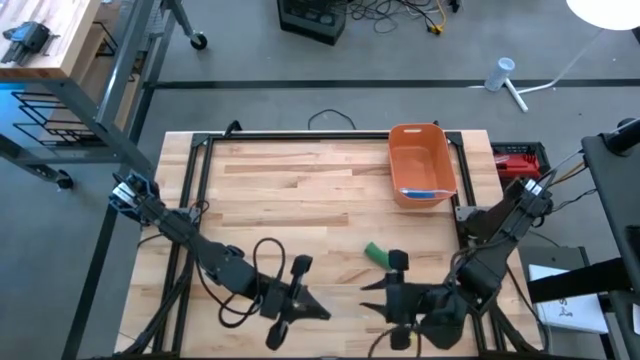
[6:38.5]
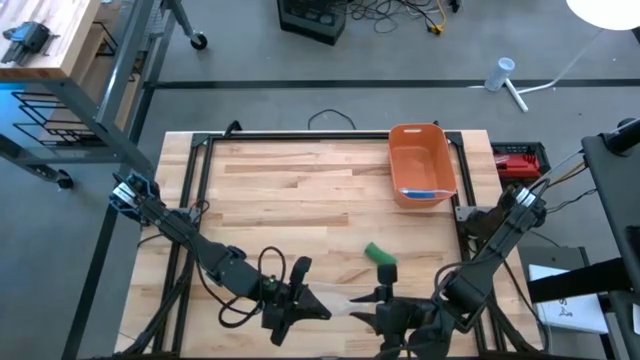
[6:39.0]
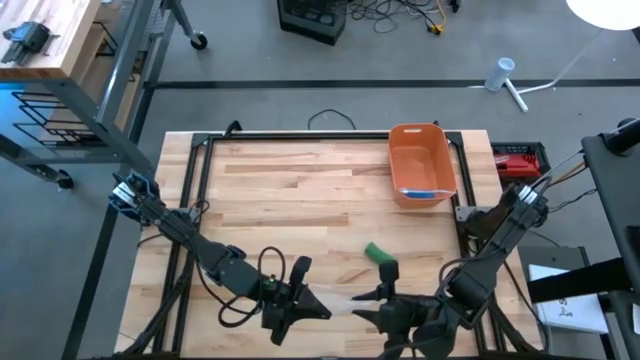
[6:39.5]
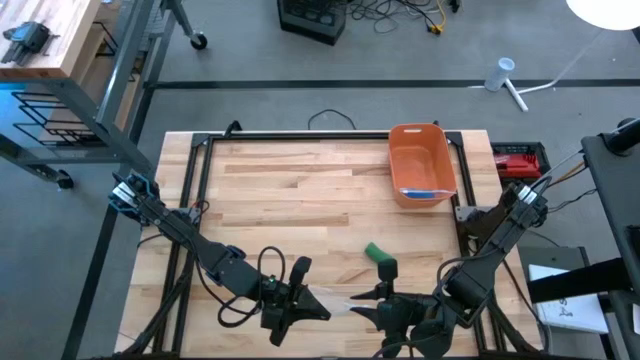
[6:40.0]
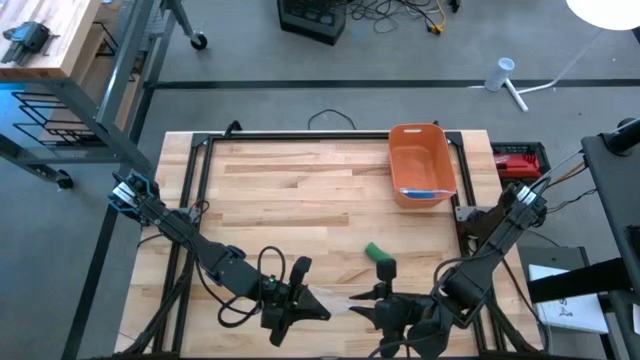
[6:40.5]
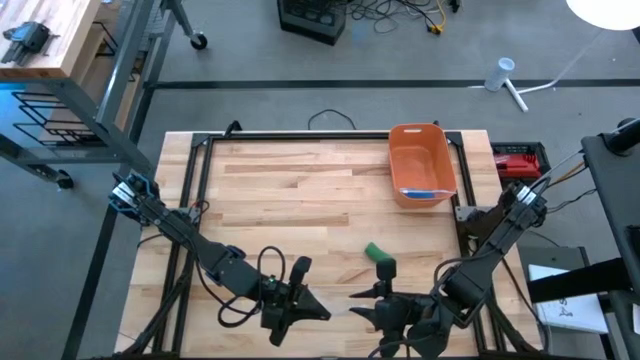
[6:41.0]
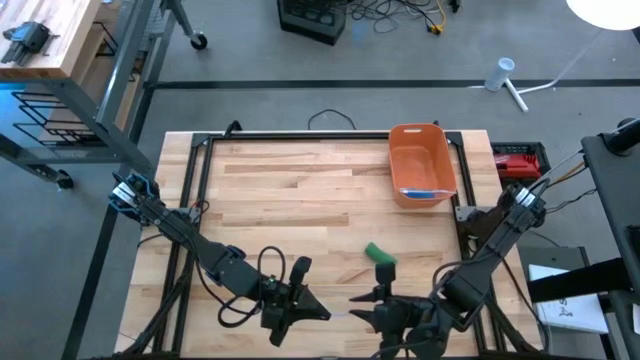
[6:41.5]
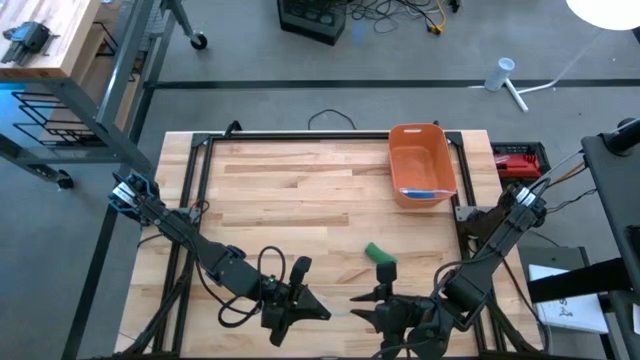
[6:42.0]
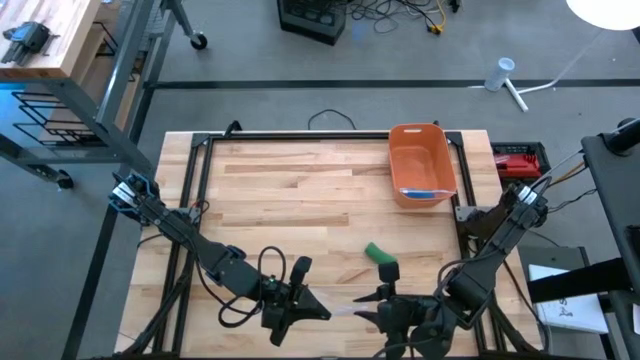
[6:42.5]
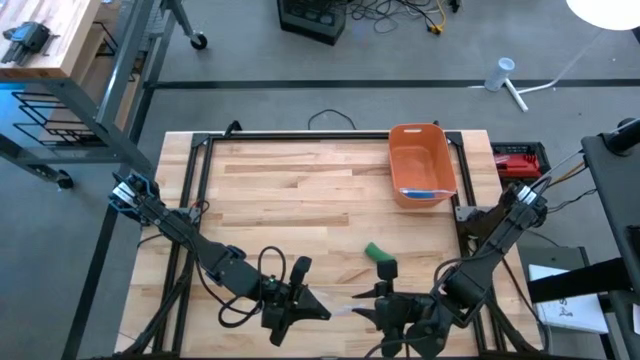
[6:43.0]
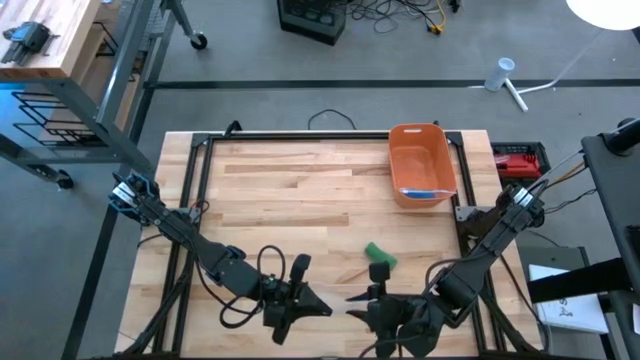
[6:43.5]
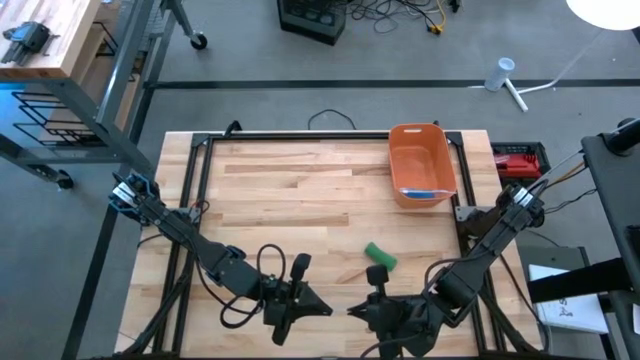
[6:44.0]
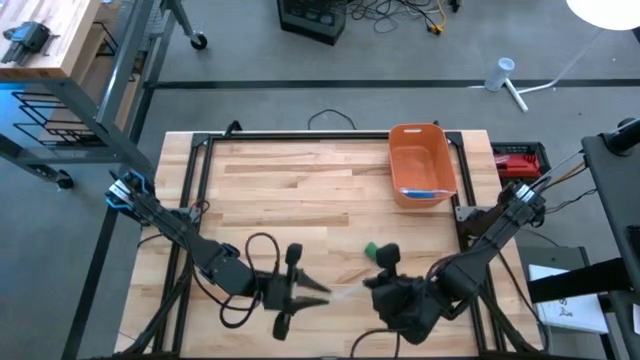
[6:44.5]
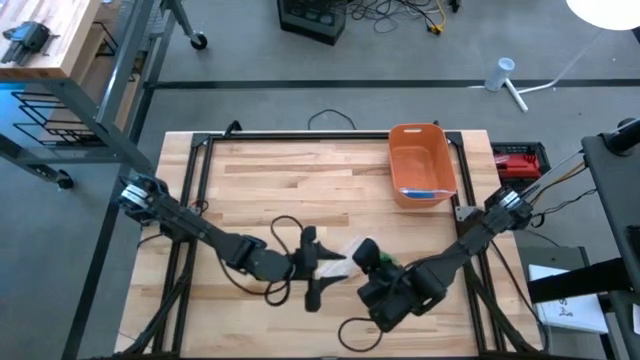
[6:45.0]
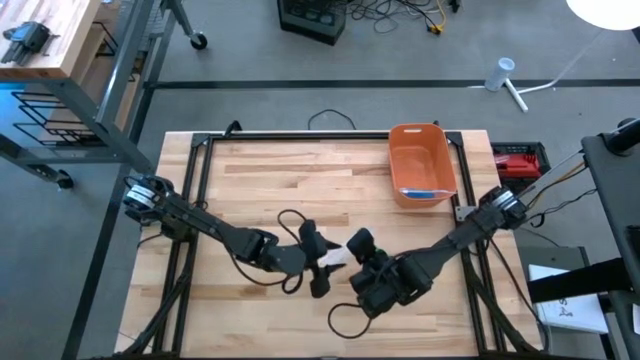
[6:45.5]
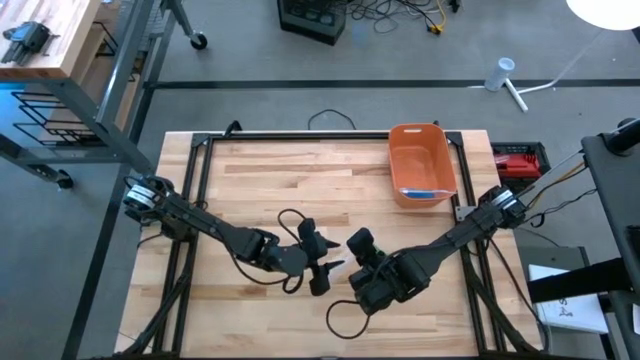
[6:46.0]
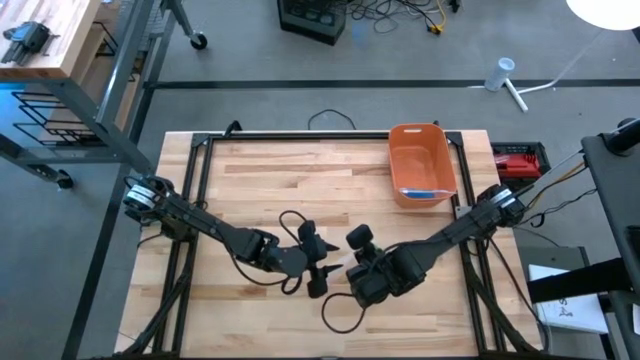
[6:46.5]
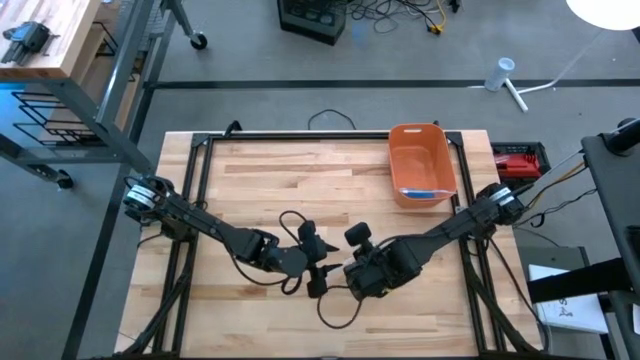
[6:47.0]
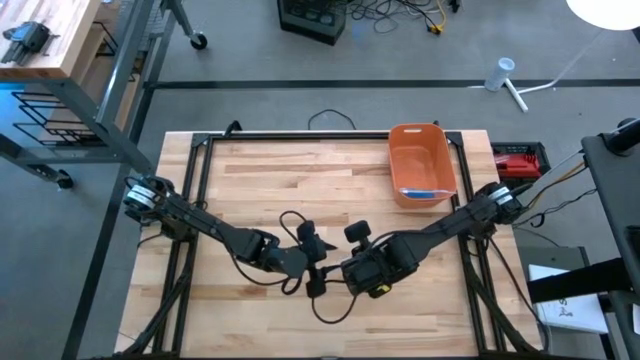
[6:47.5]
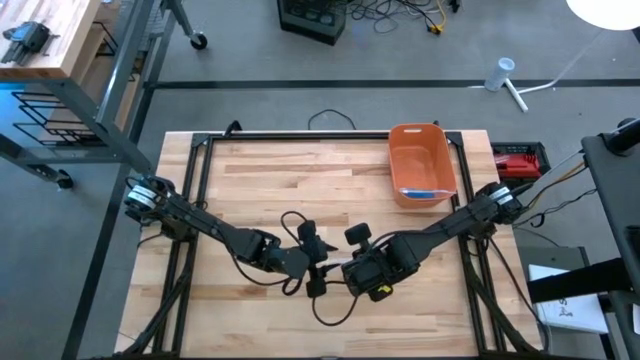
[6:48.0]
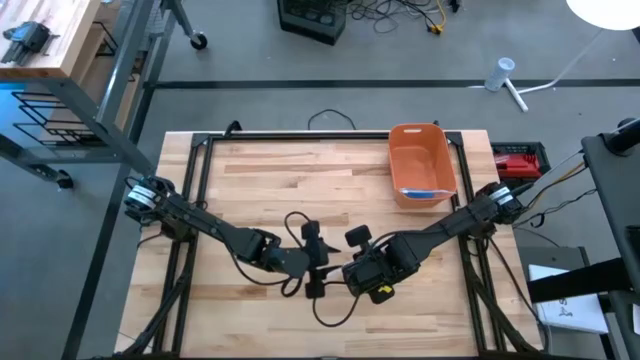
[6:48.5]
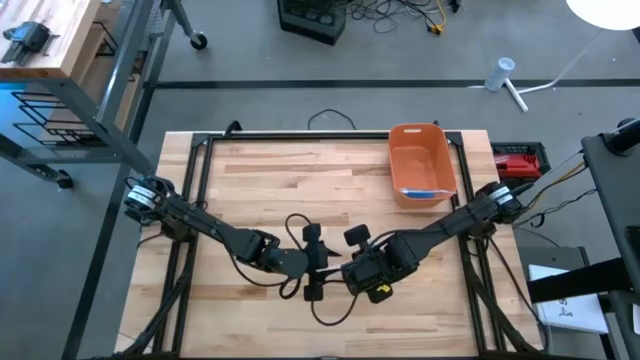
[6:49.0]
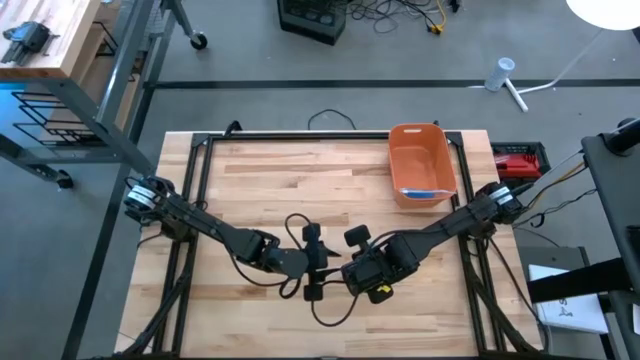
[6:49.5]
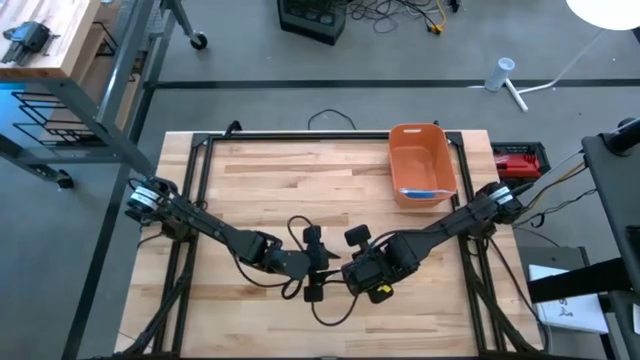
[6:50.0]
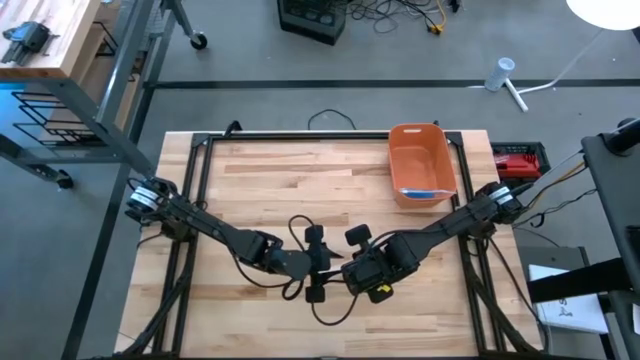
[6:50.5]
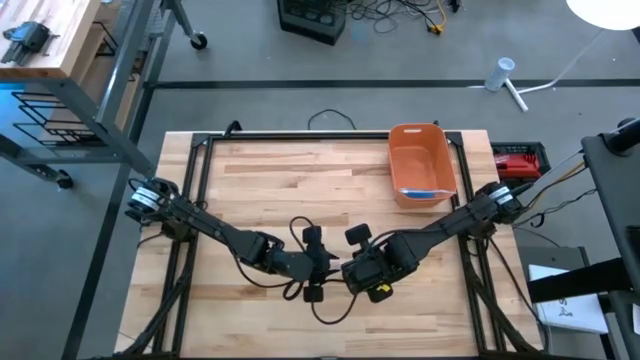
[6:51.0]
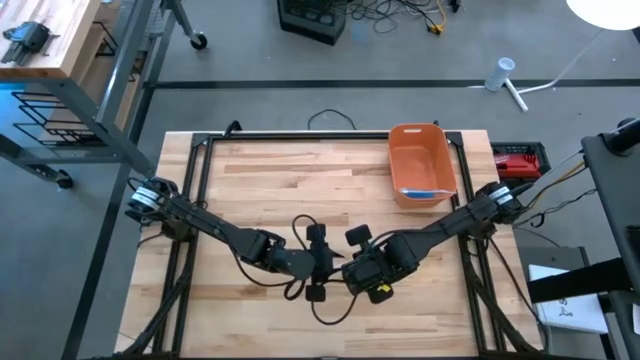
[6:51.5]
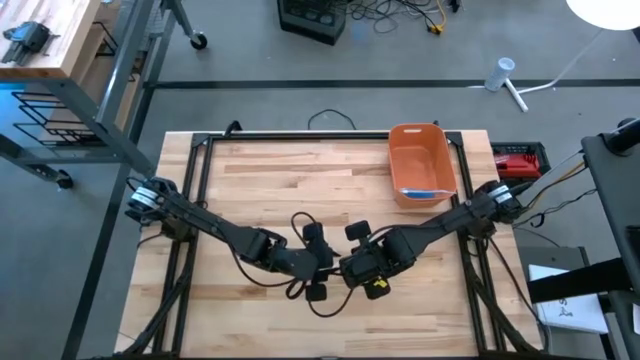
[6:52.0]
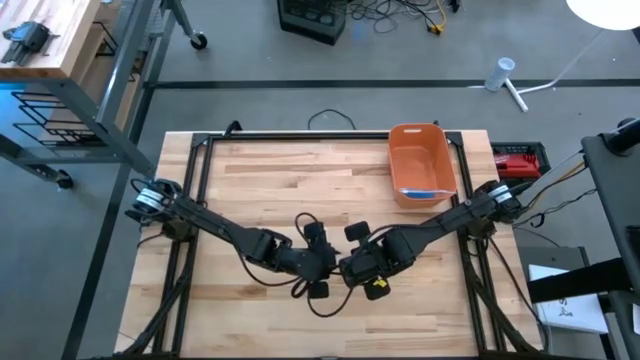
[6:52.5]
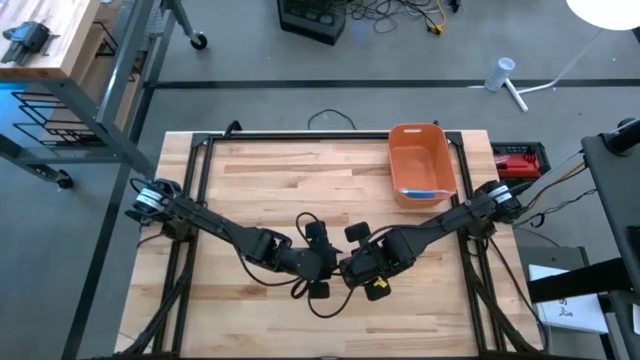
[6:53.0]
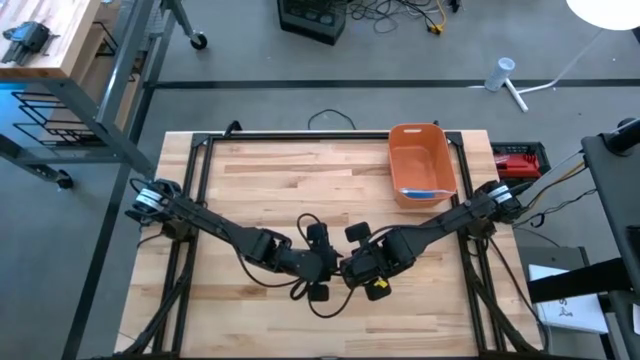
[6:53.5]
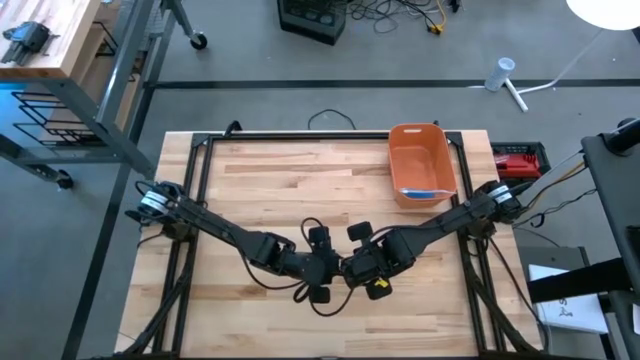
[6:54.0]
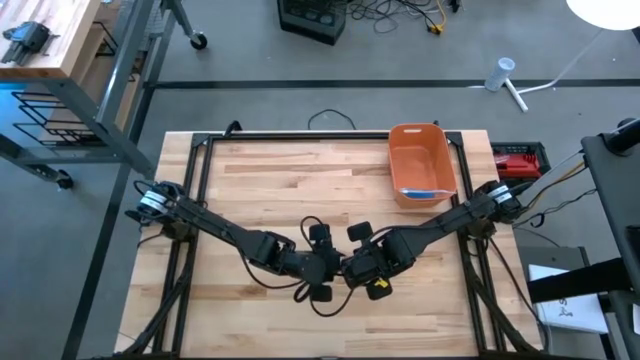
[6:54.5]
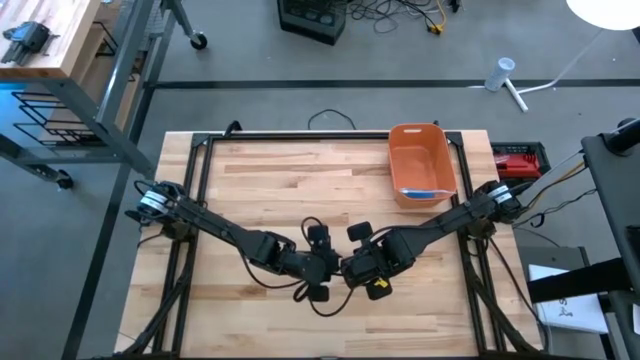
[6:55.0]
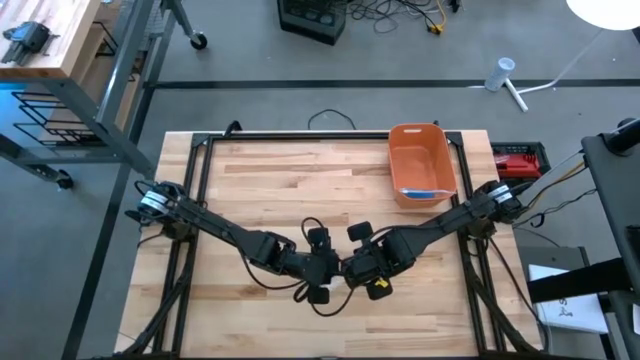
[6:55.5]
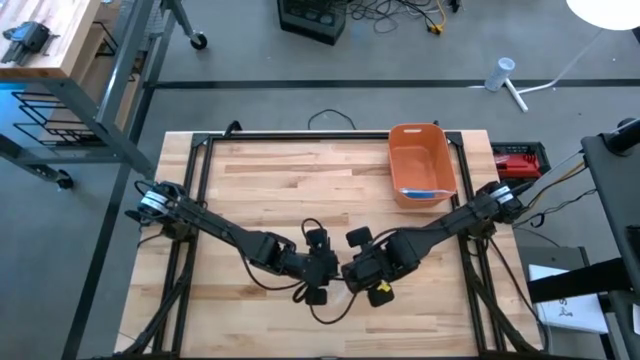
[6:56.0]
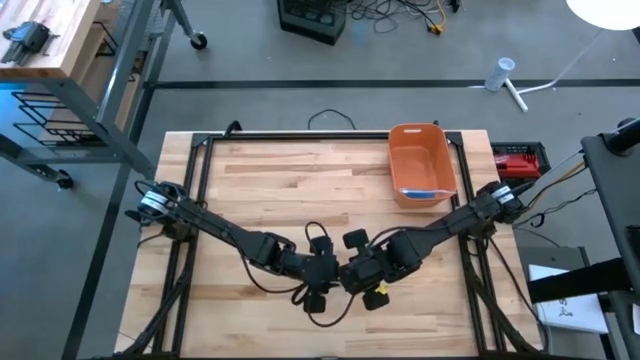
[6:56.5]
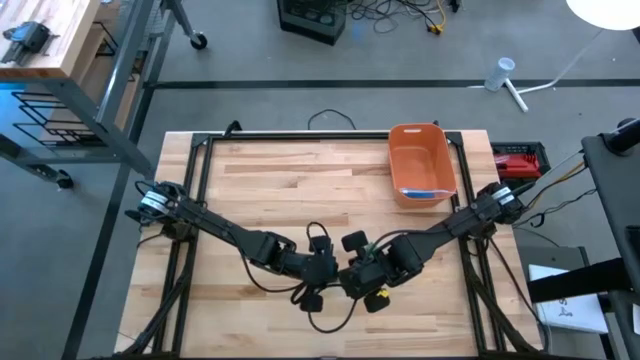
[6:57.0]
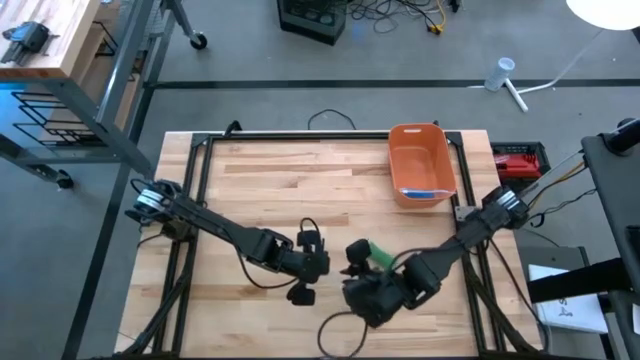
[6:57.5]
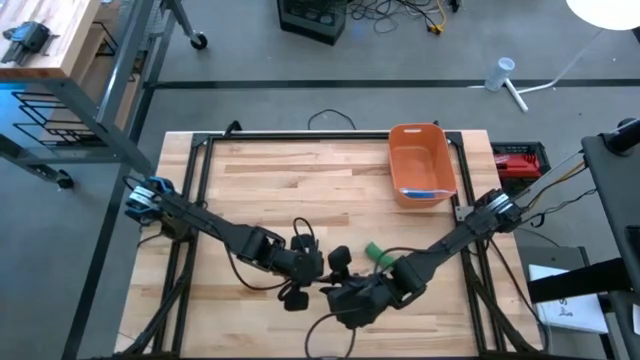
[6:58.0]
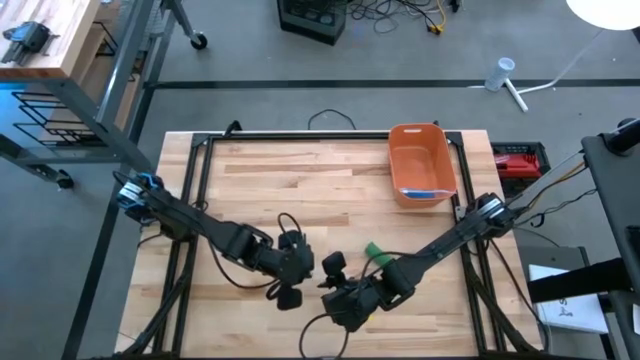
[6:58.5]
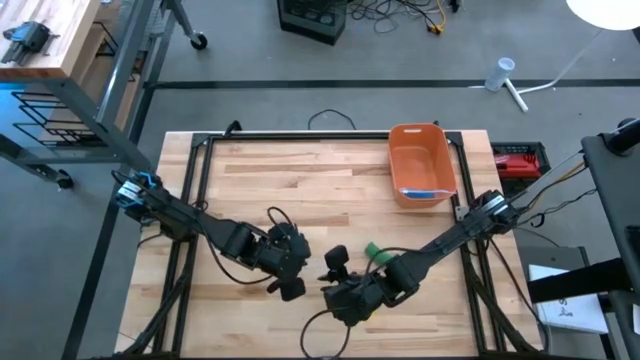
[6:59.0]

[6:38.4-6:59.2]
Task: Roll bandage
Put the green bandage into the zip bag
